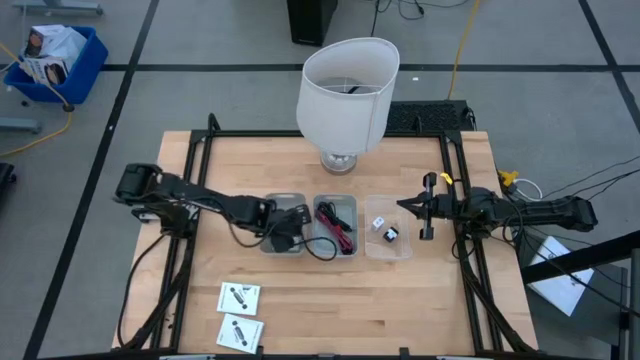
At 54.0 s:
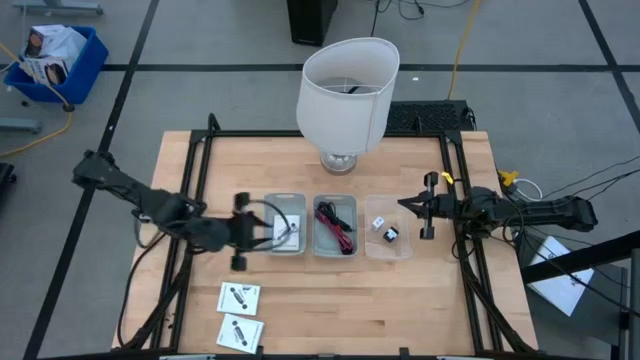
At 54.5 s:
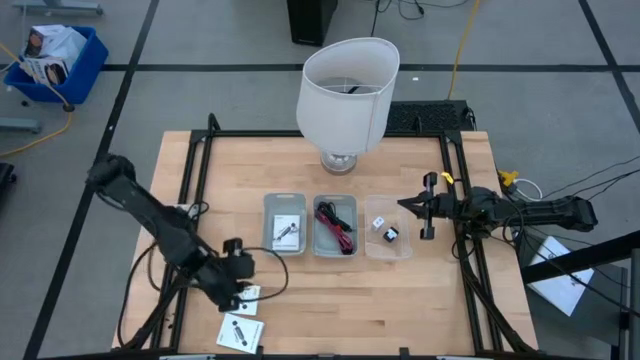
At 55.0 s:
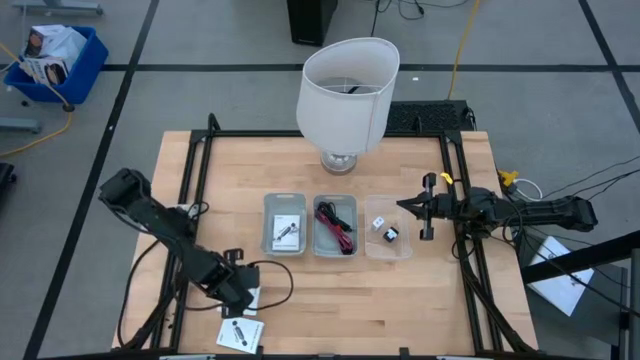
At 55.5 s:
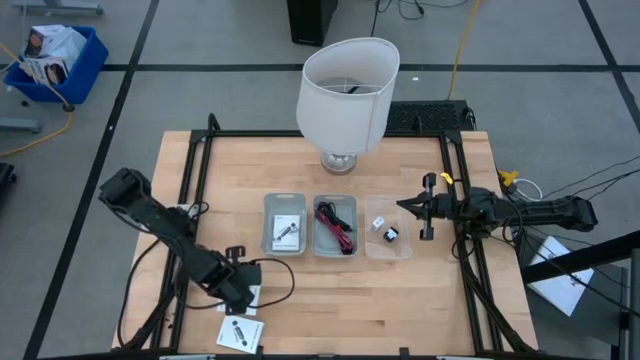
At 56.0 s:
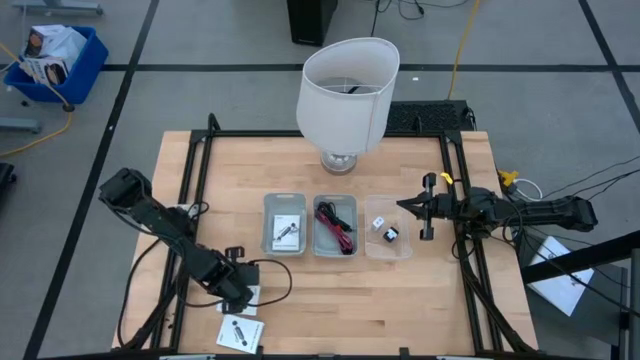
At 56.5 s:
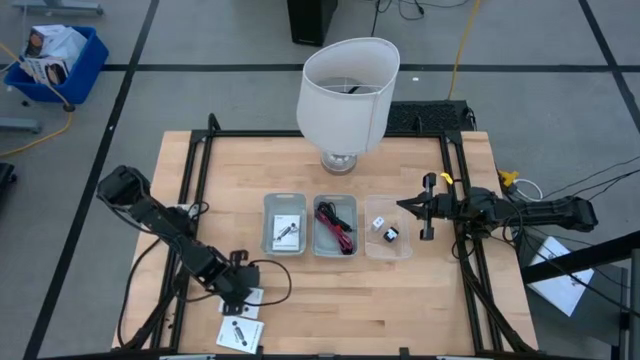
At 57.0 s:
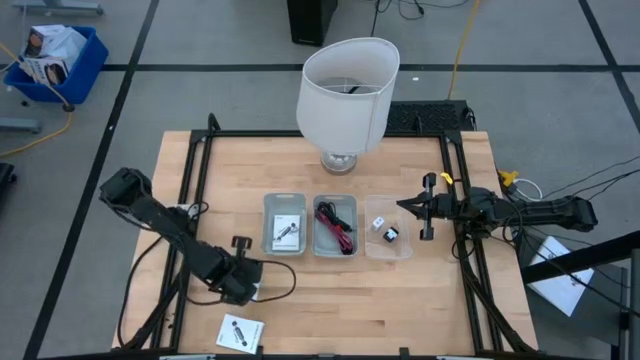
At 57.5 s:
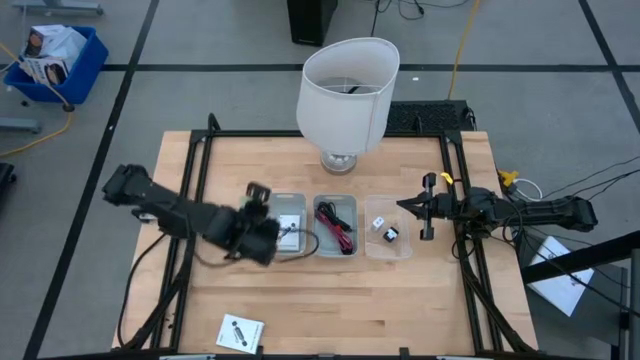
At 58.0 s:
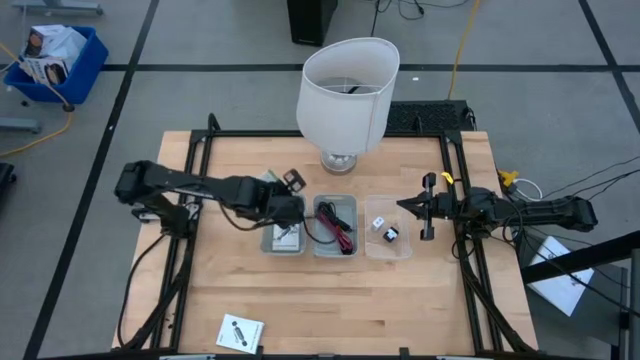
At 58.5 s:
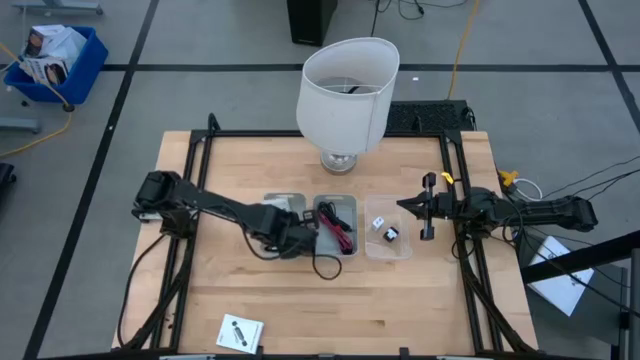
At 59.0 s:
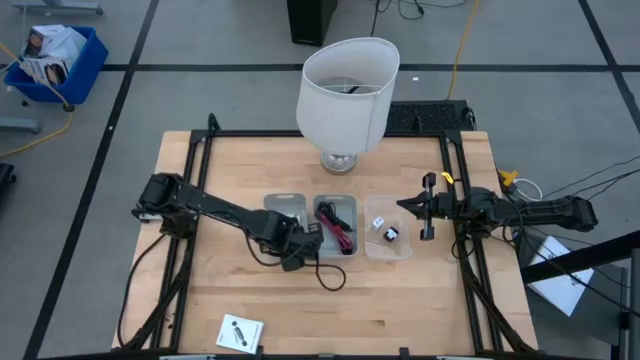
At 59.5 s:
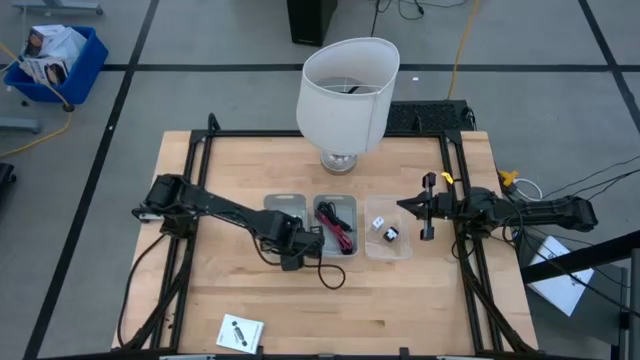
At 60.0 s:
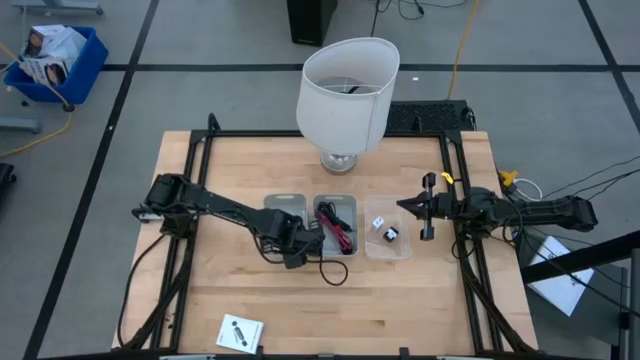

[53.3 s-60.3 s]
Task: Pick and place items into bin
Put the top card reader box into the left gray bin

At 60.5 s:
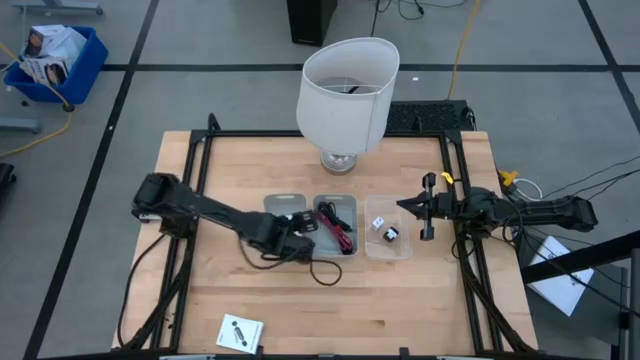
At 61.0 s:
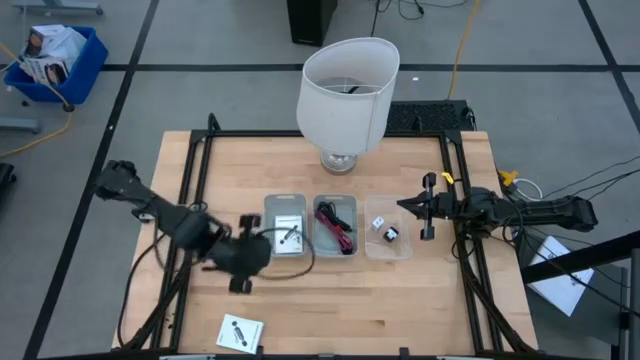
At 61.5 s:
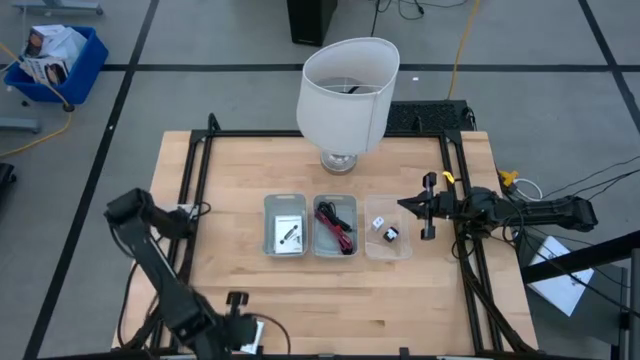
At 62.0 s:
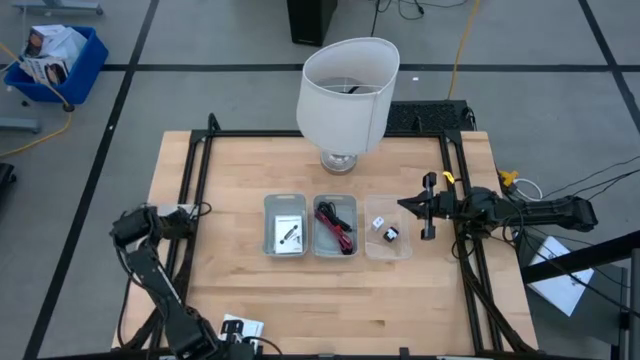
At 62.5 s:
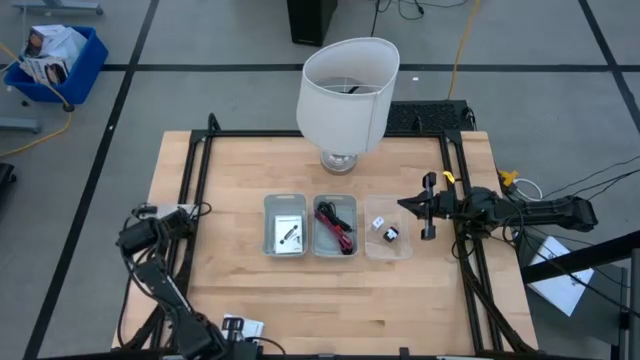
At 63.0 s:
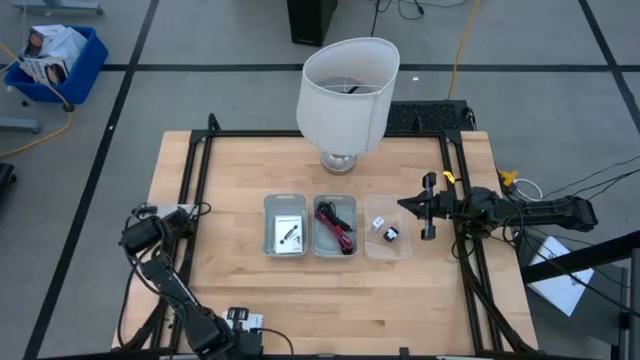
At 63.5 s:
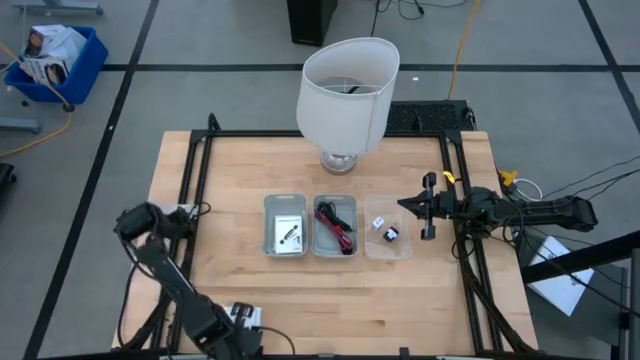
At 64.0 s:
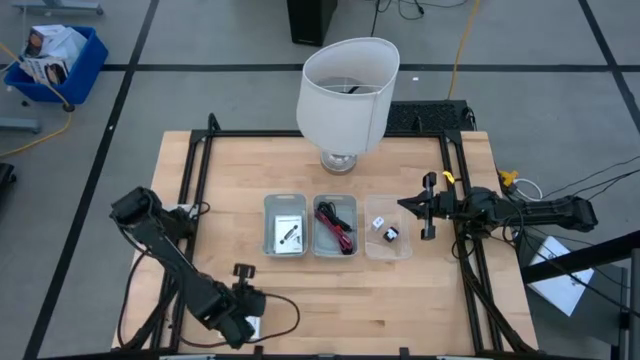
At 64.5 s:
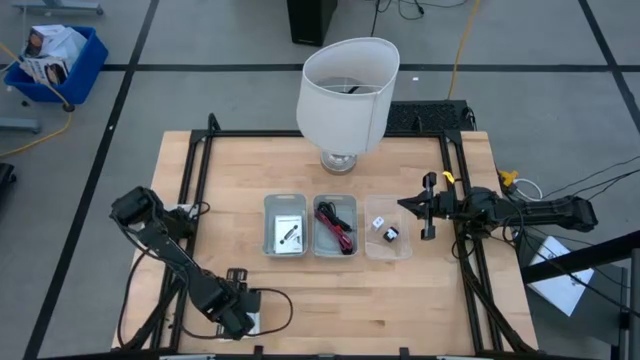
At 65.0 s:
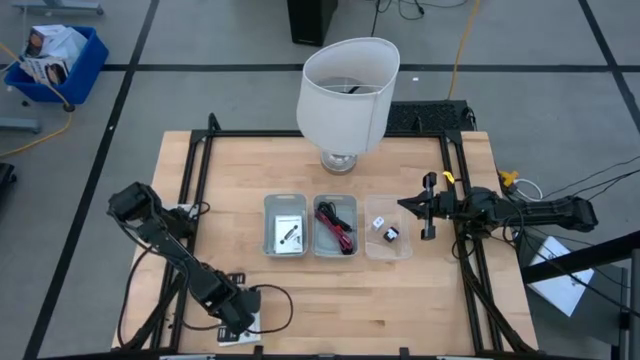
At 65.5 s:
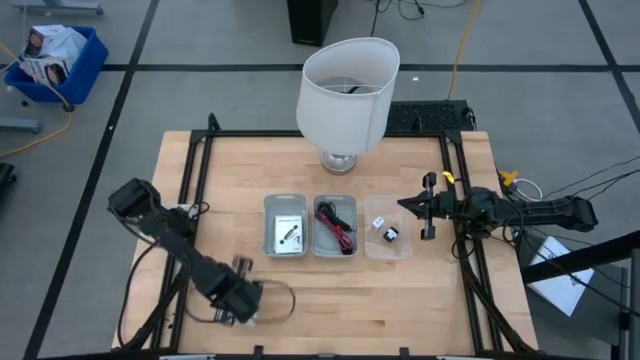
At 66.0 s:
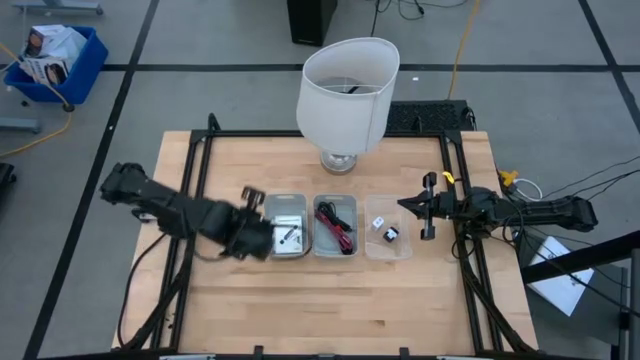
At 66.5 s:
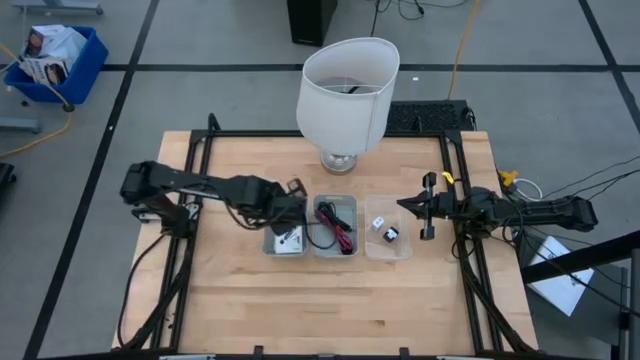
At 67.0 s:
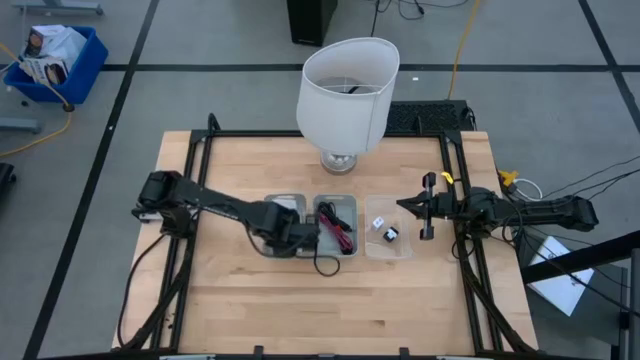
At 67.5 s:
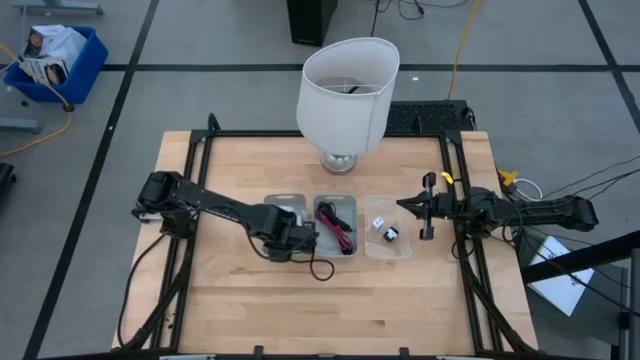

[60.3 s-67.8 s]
Put the card reader box into the left gray bin

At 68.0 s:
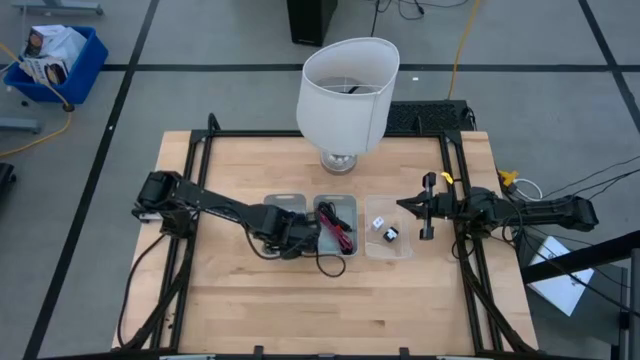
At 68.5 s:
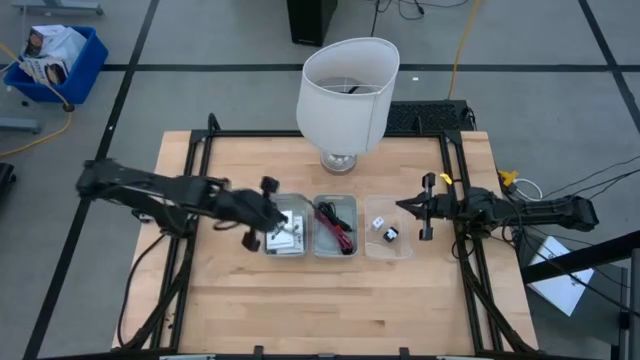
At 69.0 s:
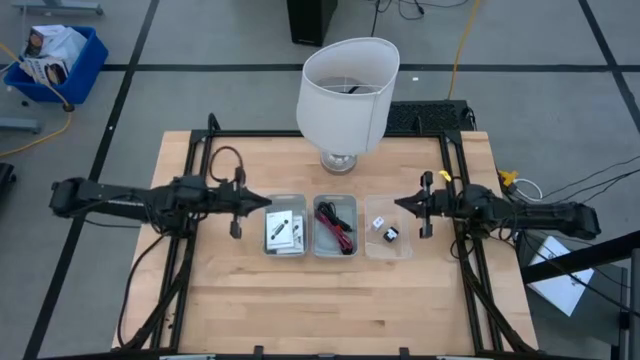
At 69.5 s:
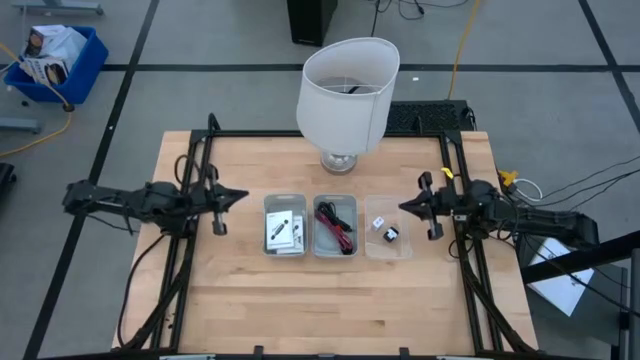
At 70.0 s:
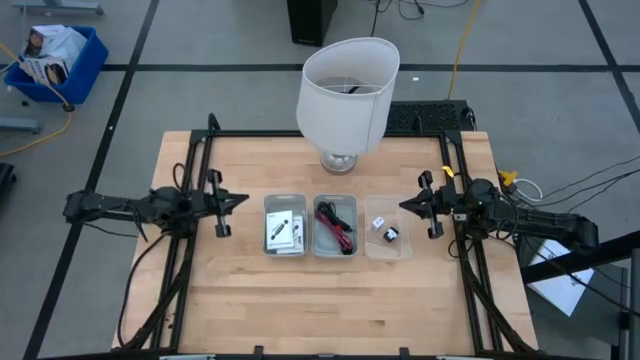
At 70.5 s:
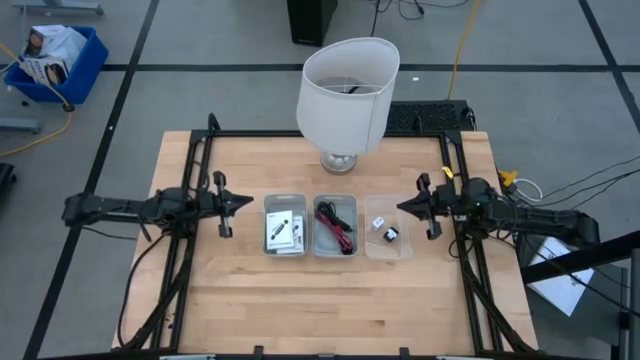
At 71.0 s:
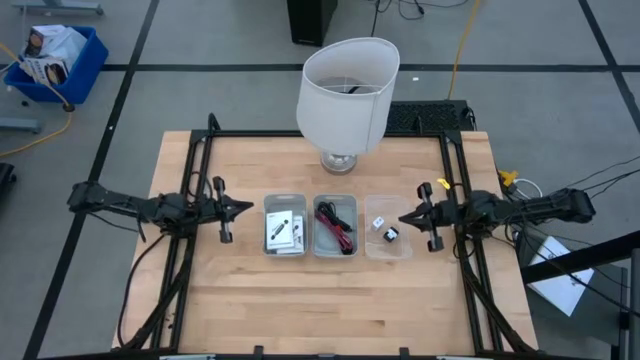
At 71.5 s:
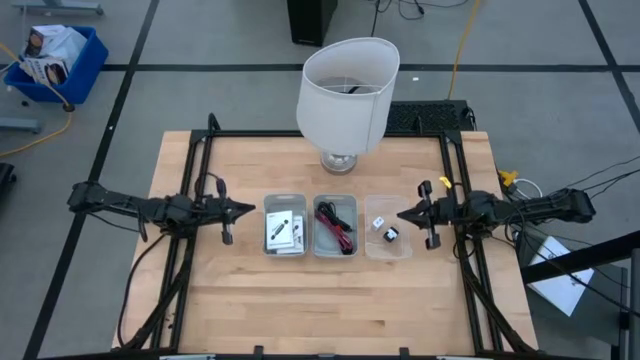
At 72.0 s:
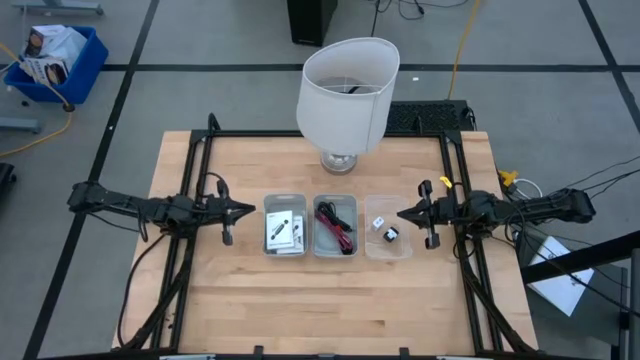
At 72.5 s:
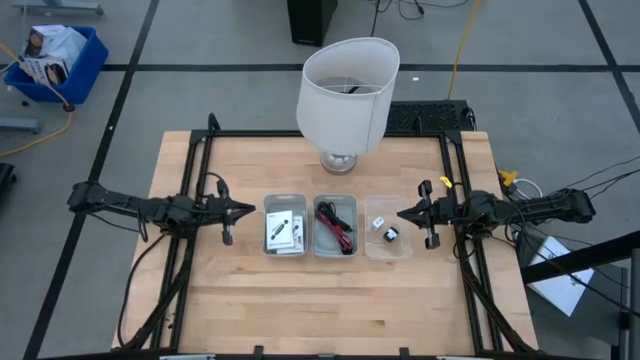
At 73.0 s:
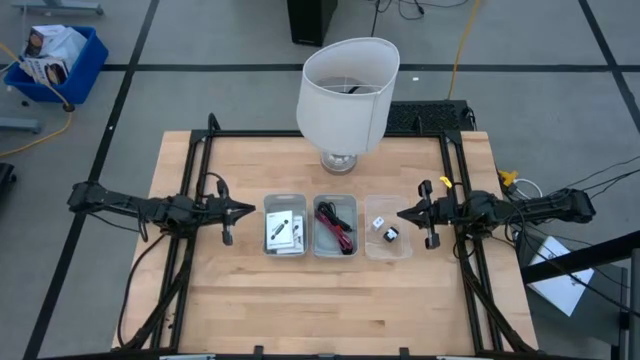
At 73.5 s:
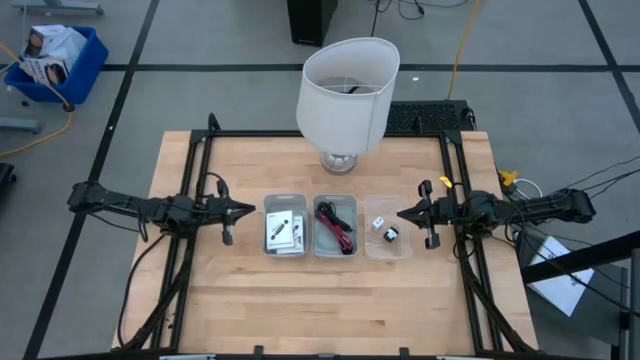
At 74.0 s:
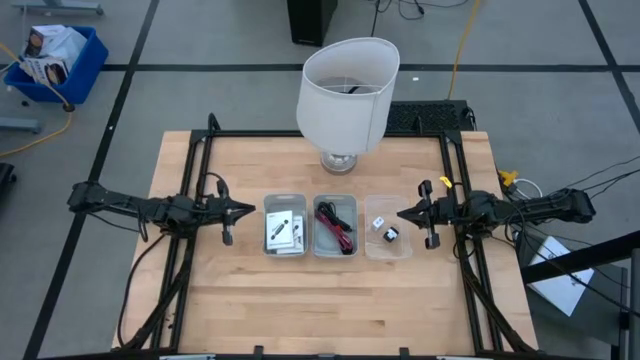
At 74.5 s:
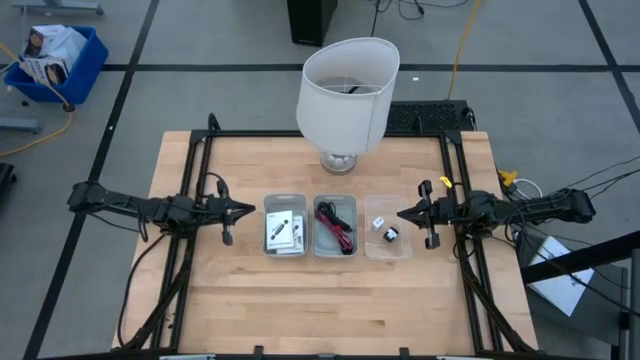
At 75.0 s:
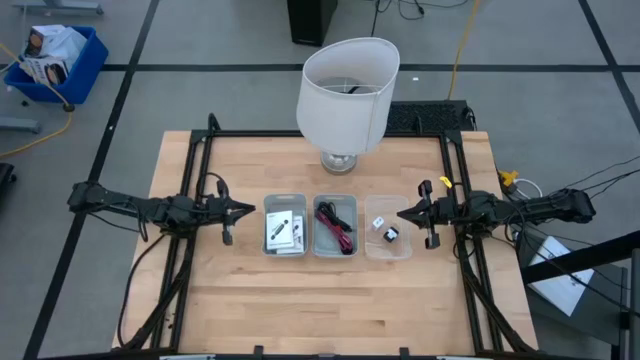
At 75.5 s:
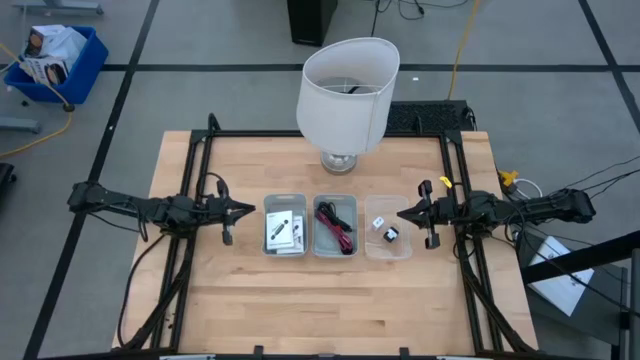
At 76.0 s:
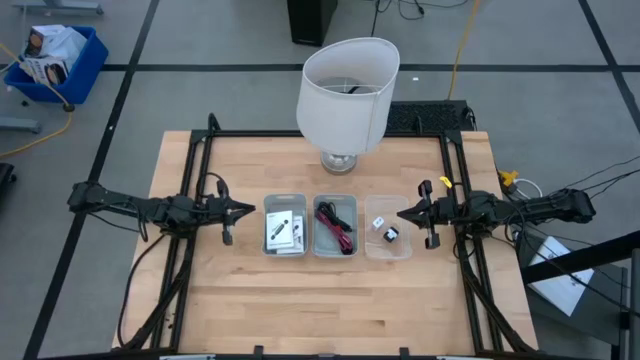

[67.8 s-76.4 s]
Return to Home Position
